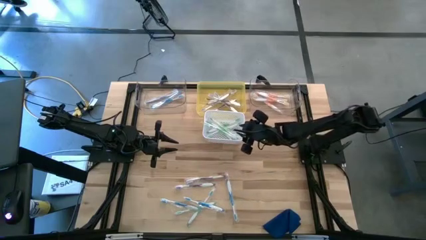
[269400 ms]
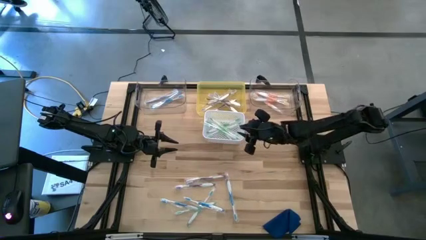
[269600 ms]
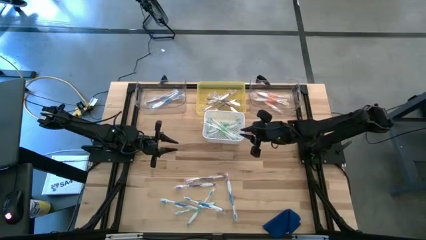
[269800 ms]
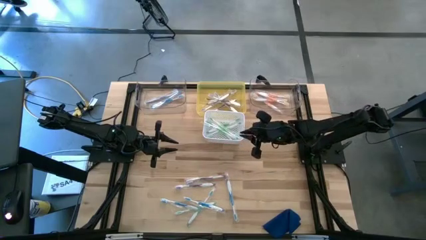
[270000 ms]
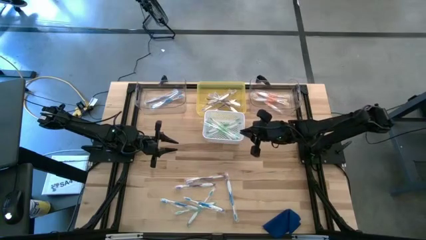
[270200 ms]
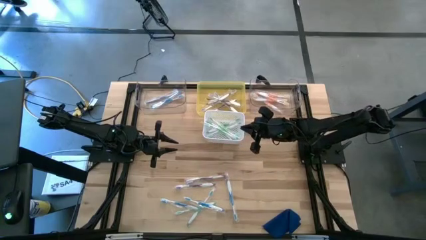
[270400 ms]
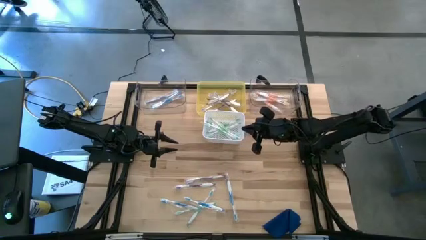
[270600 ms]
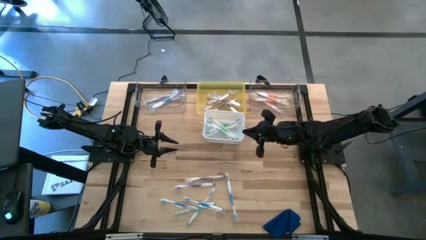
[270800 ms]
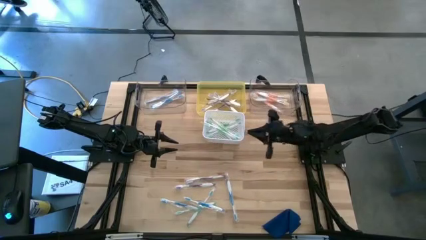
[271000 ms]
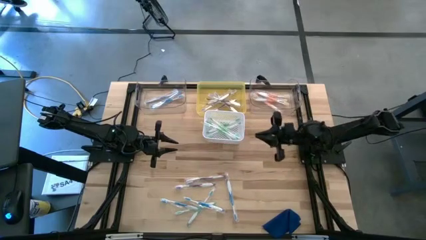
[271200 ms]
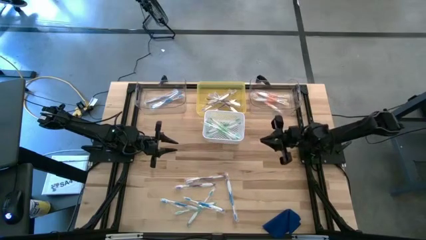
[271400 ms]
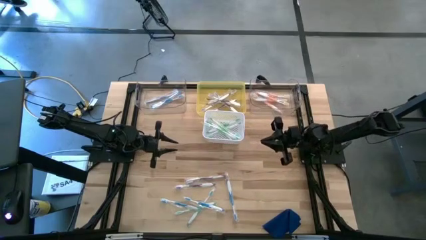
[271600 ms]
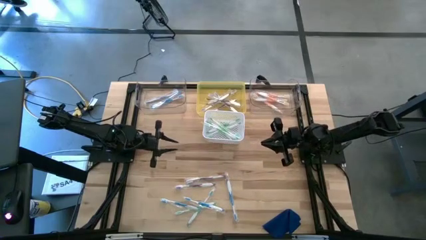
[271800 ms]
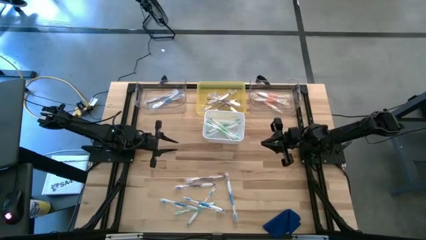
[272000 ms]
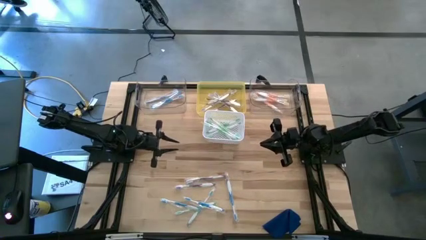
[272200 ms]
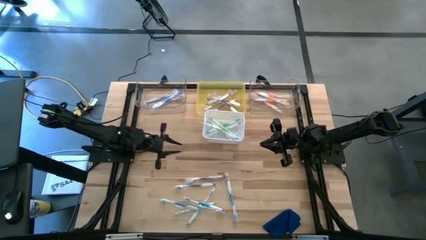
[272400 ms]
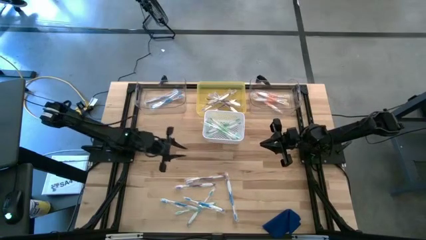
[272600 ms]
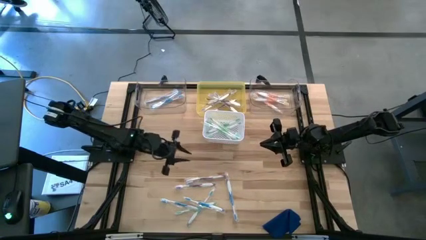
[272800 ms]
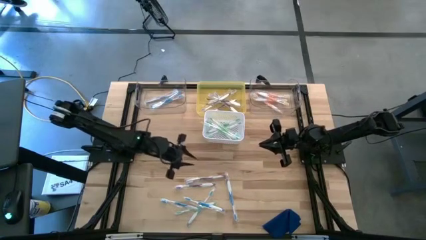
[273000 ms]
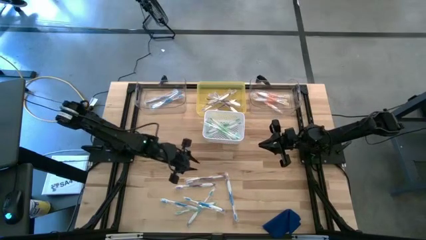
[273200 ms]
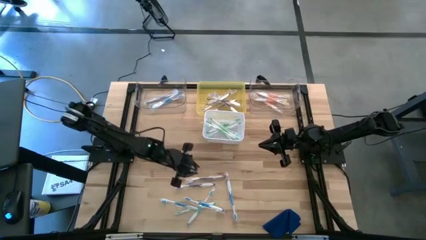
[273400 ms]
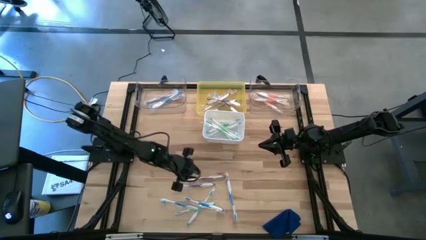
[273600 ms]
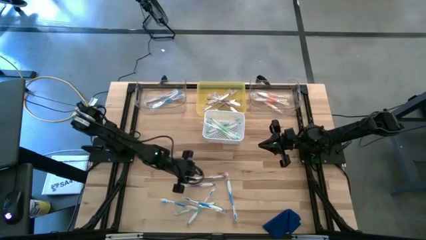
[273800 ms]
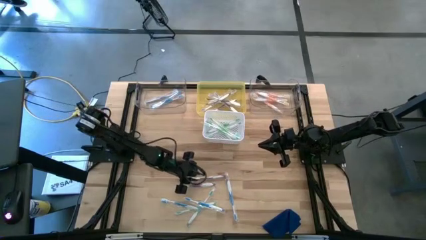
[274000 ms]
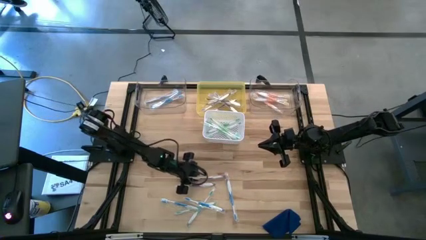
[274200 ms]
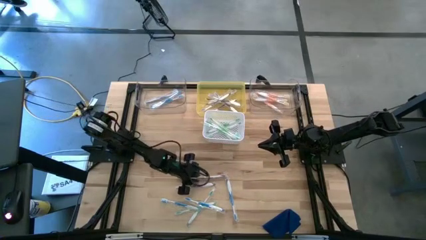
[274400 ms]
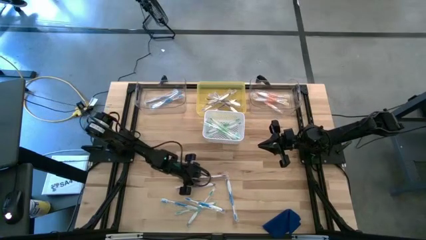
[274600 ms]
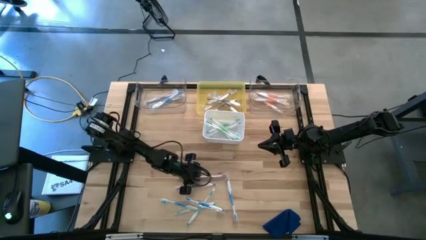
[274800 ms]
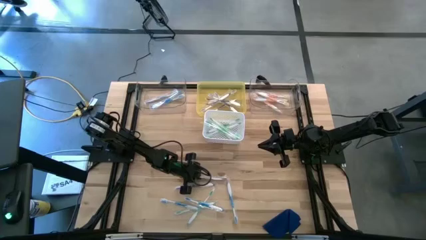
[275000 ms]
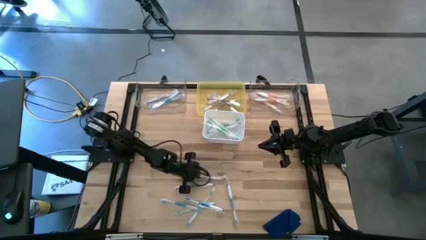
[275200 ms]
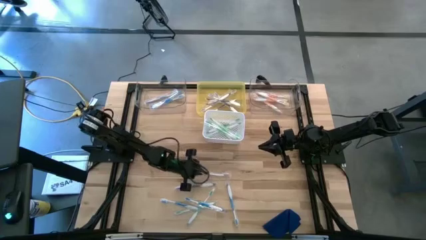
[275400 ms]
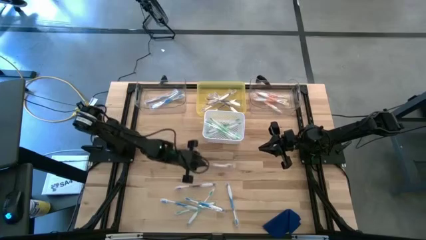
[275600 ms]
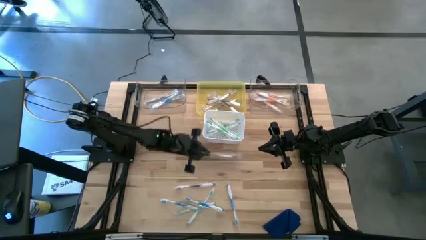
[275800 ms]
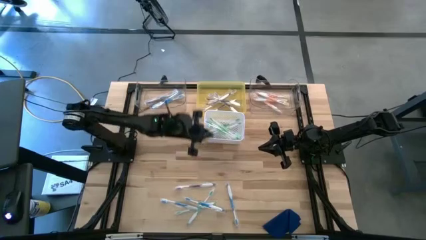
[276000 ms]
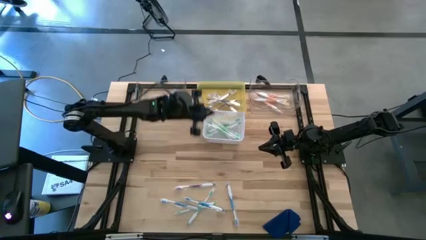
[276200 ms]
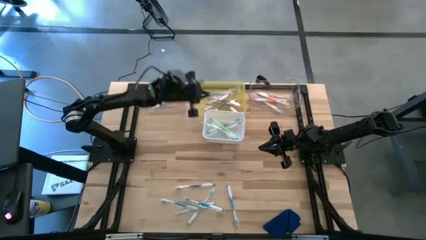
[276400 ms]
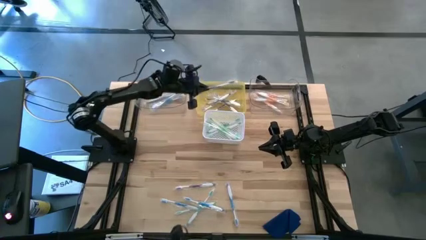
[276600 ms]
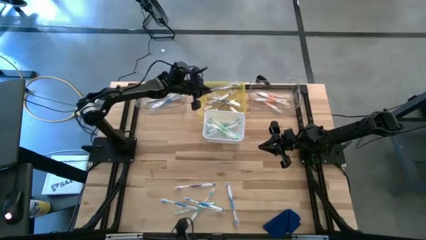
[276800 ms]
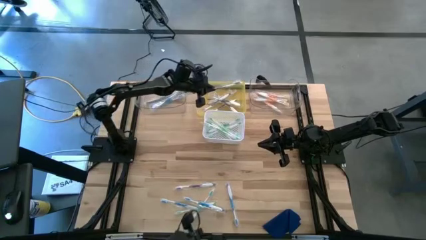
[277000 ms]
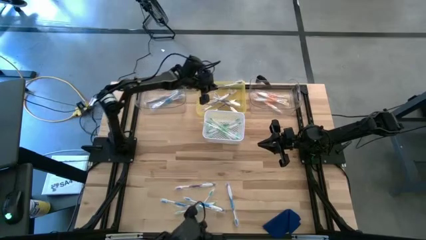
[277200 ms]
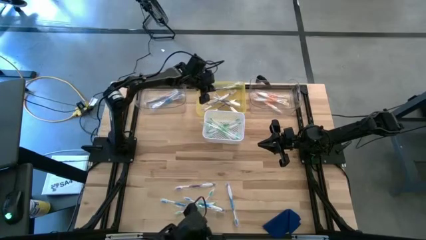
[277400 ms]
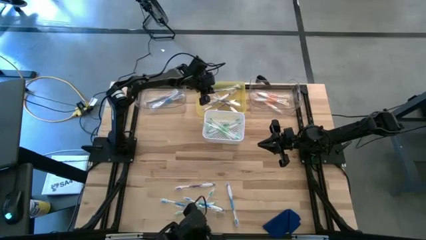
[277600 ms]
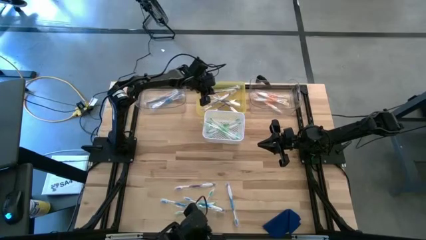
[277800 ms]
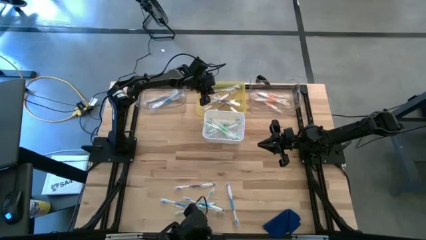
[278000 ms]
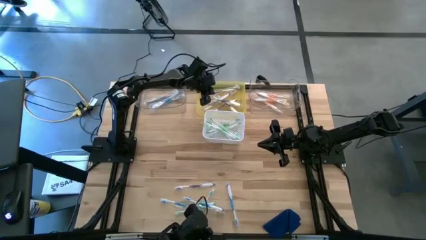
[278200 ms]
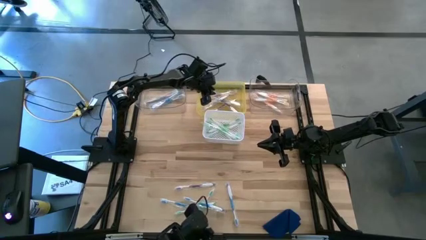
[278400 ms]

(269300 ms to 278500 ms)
Task: Pick & Place Toothbrushes
Put the purple toothbrush into the yellow bin

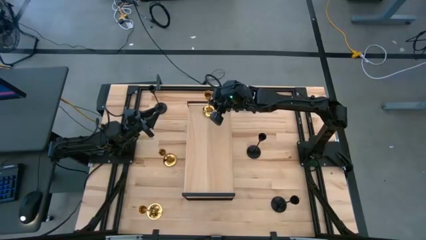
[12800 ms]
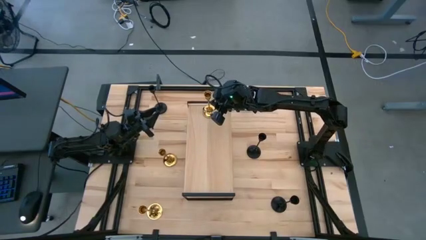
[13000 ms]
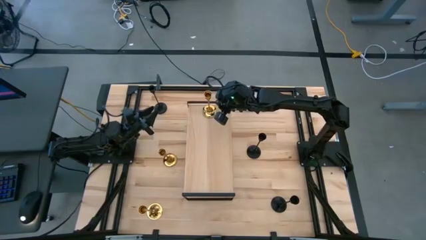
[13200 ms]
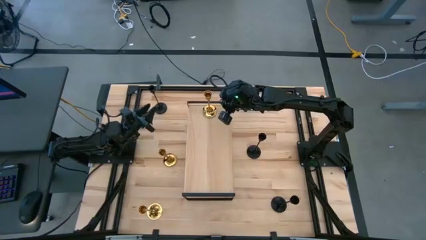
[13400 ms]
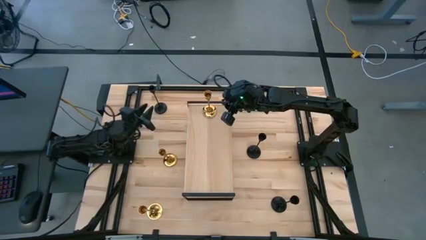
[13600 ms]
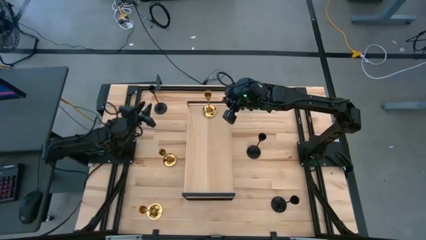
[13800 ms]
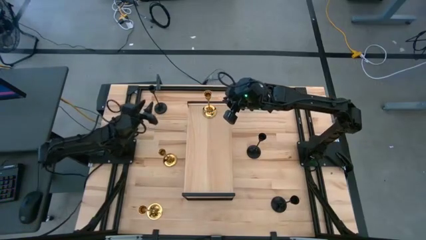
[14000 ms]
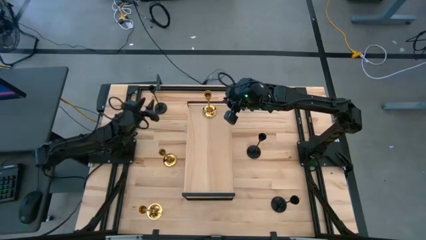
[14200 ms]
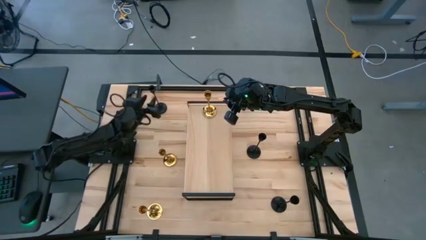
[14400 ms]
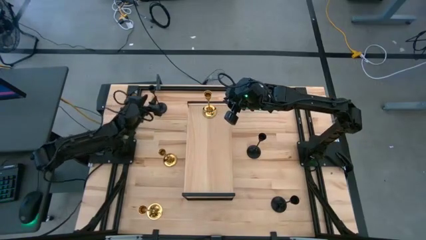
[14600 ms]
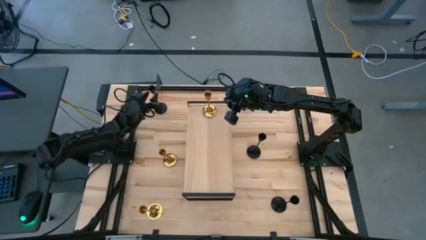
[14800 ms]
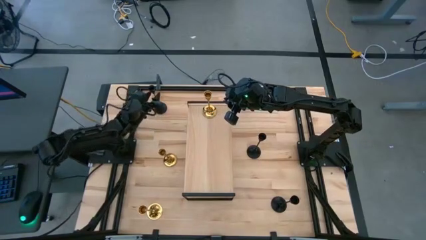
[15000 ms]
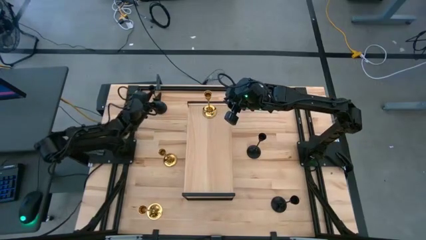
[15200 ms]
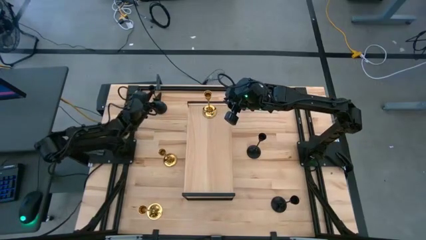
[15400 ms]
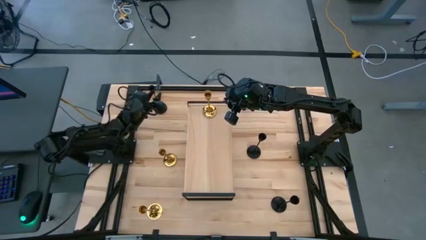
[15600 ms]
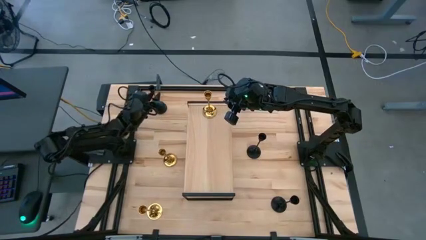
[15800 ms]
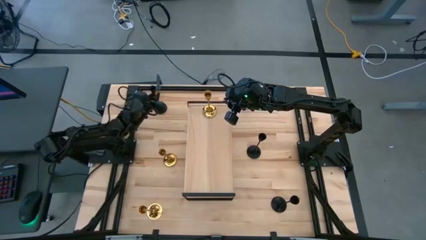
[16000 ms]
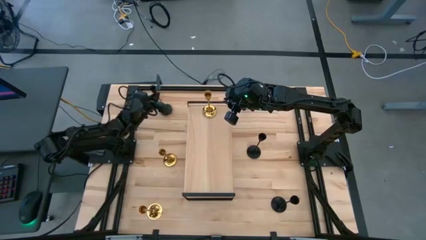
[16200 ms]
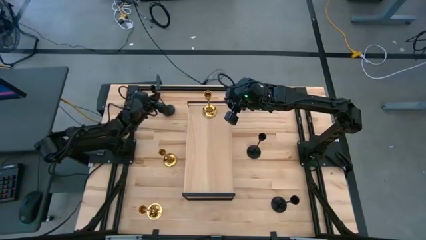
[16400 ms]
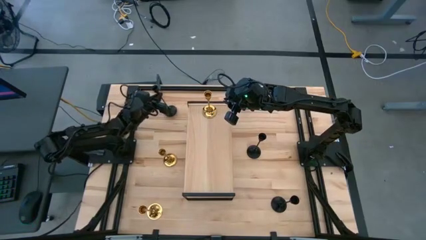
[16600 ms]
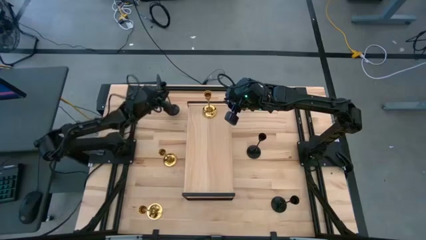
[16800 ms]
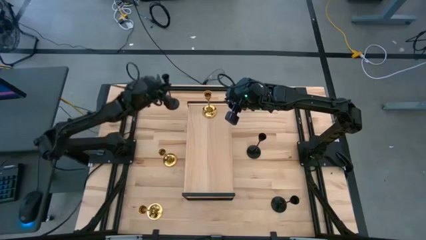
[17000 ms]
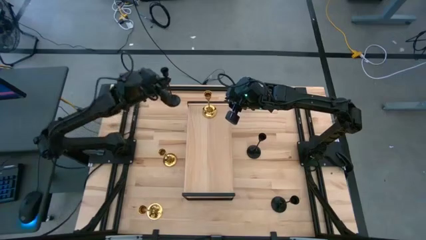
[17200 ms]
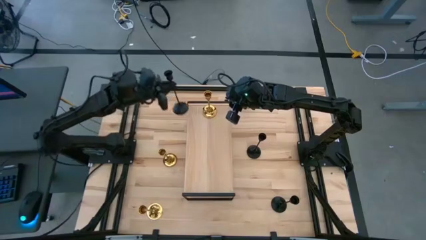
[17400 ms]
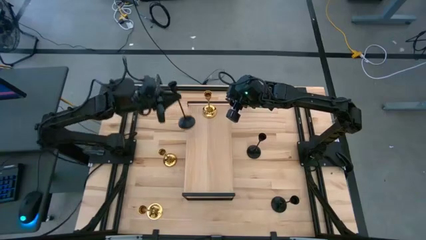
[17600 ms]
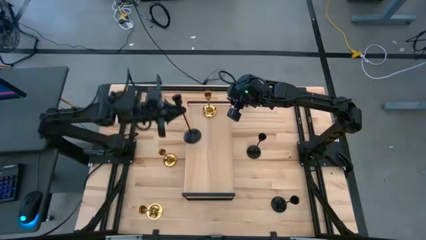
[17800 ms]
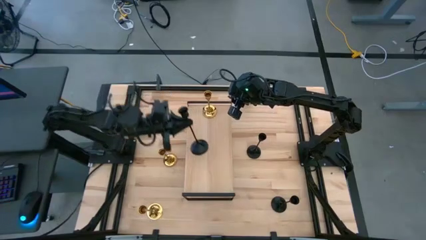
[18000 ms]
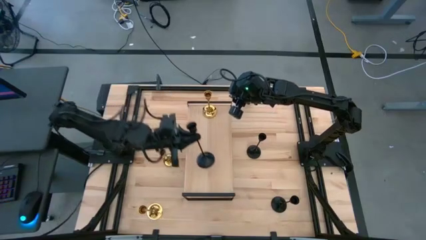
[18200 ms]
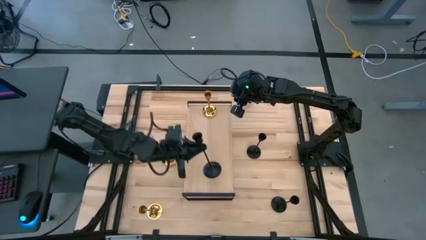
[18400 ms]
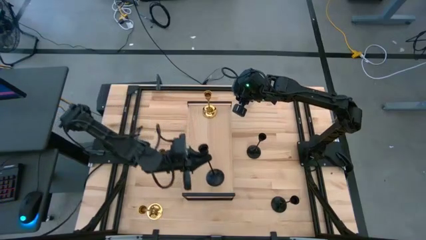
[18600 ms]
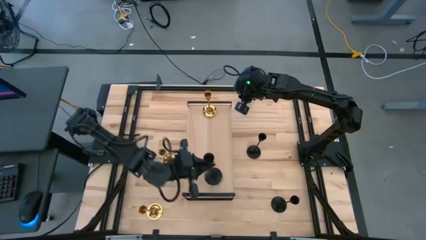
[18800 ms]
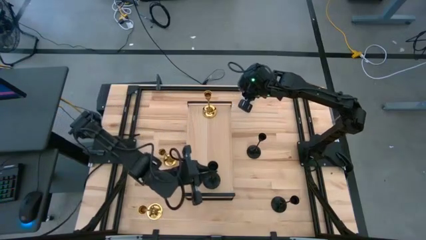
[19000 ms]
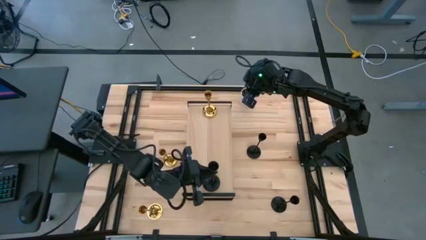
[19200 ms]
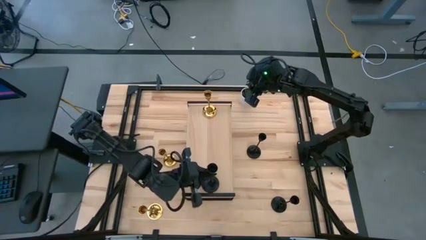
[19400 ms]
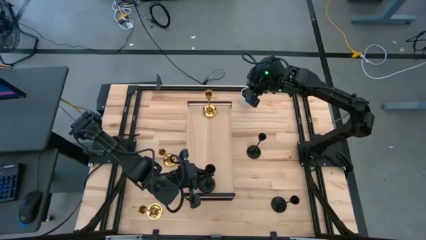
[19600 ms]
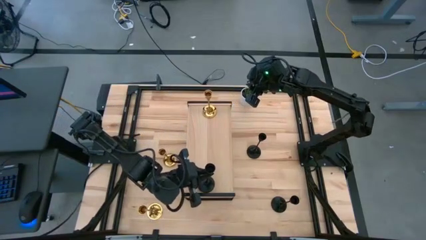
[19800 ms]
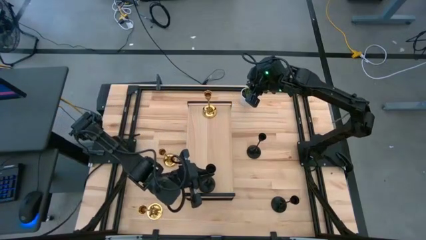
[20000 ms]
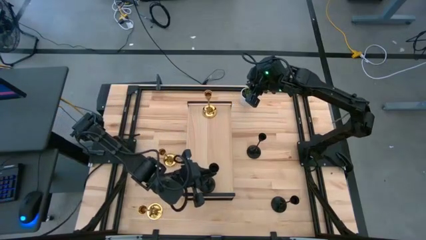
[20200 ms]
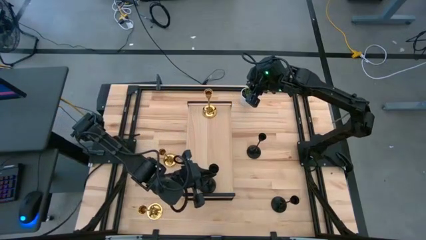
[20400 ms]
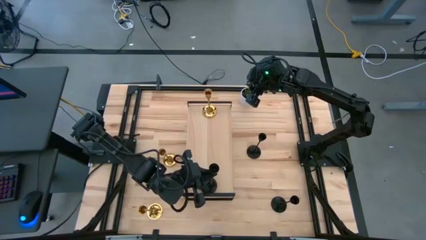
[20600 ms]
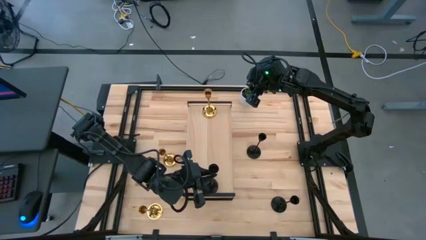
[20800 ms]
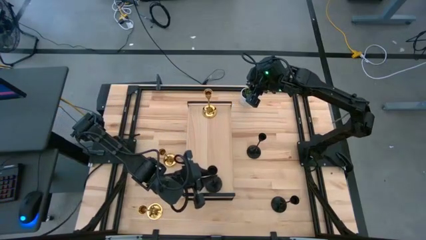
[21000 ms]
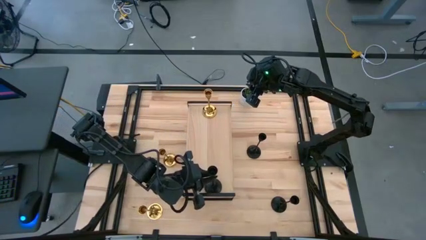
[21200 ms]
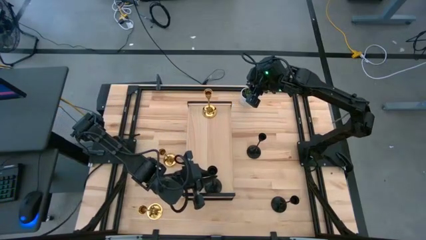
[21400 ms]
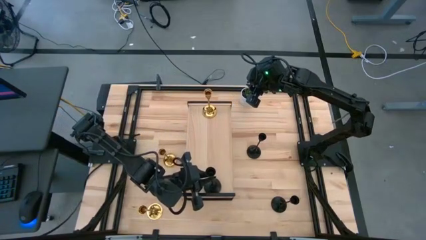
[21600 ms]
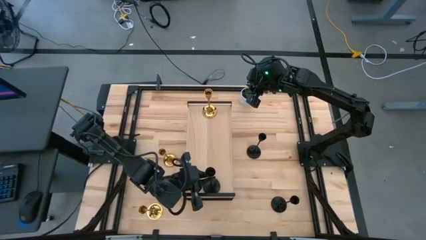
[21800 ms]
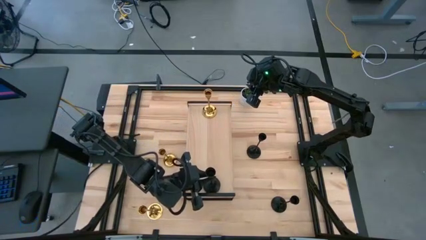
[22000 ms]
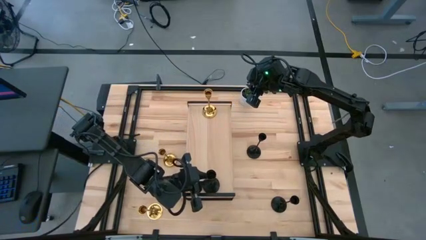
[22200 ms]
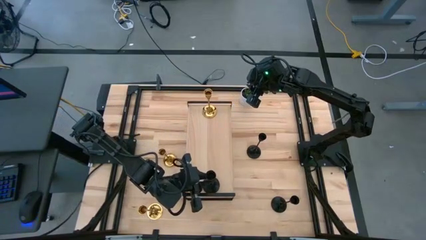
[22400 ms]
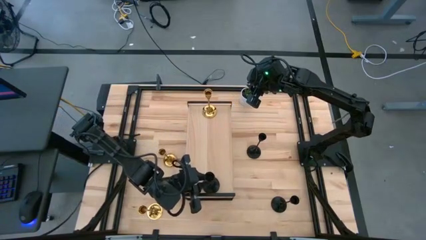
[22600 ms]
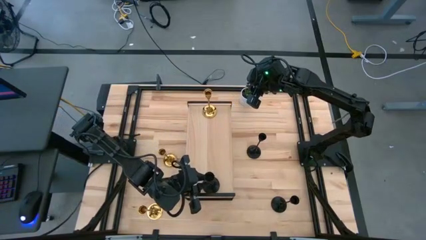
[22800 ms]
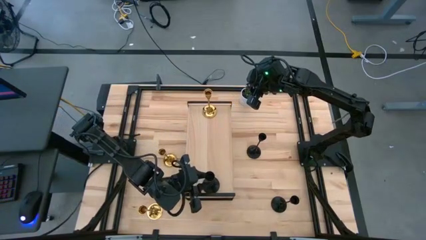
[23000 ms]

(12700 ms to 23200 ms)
Task: Pick & Place candle stick holders
Put the top left black candle holder on the shelf
